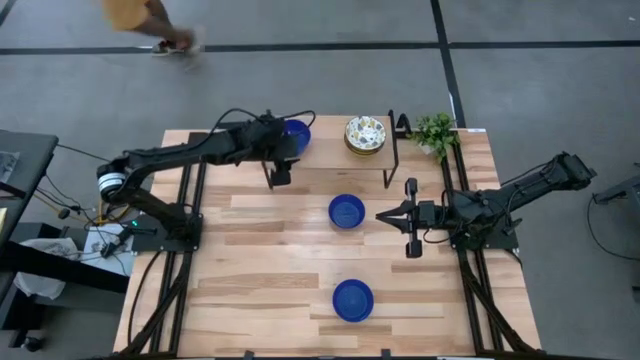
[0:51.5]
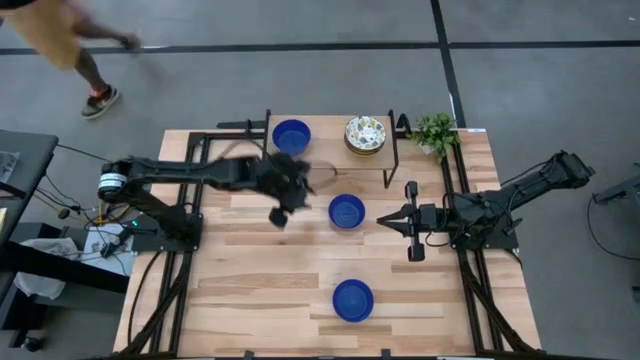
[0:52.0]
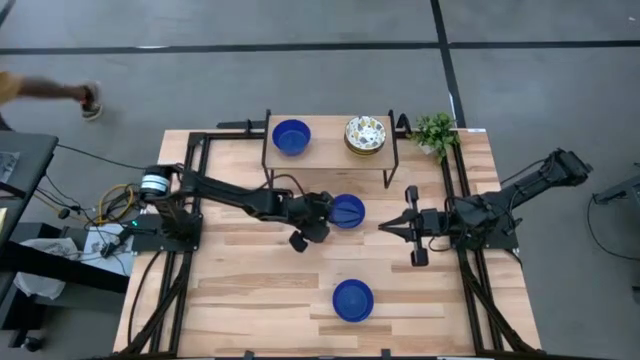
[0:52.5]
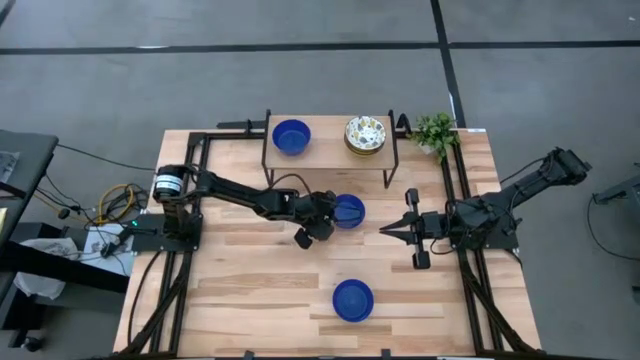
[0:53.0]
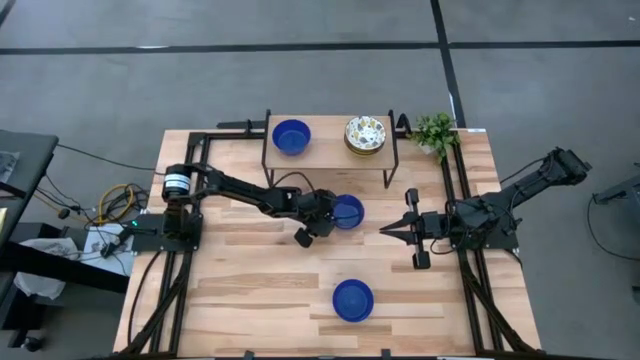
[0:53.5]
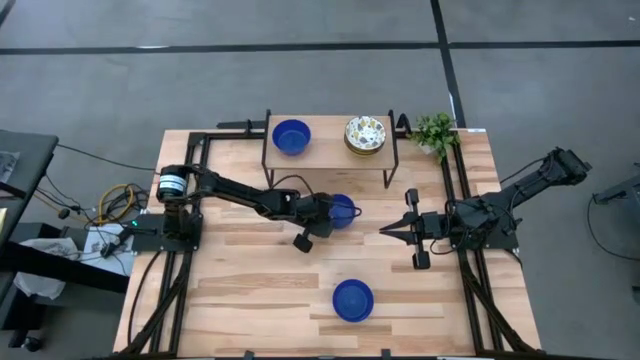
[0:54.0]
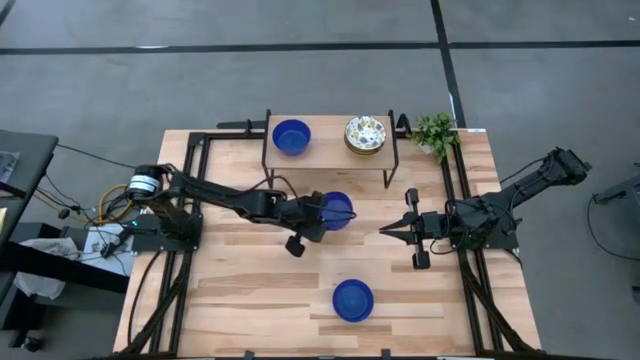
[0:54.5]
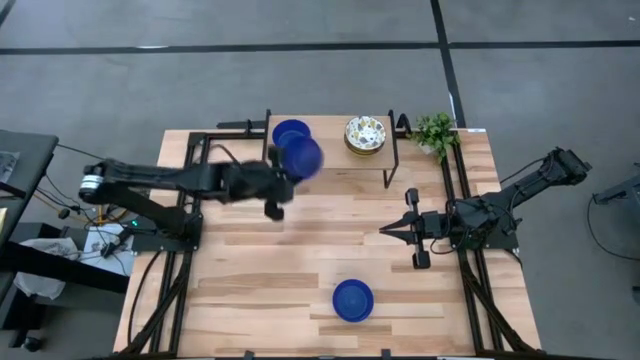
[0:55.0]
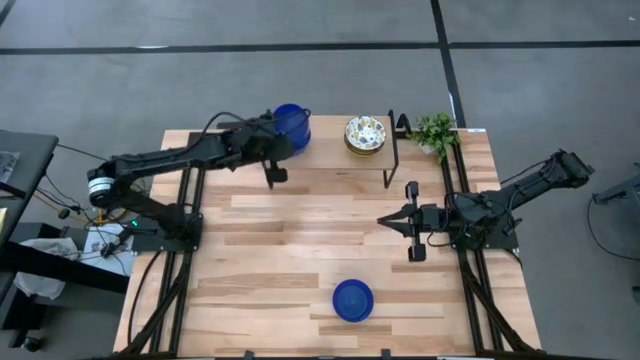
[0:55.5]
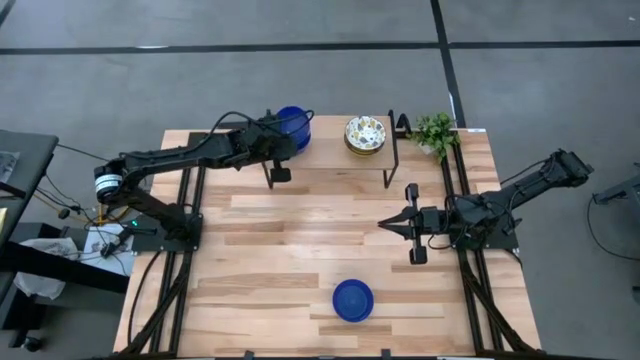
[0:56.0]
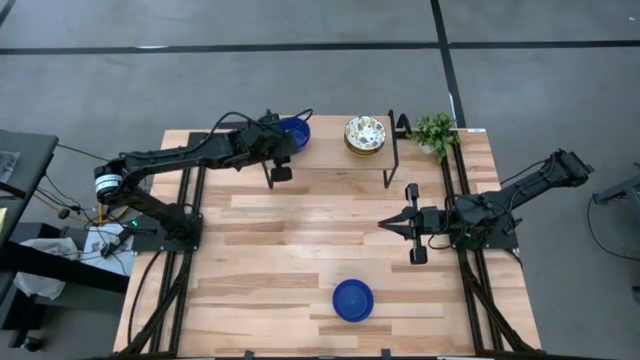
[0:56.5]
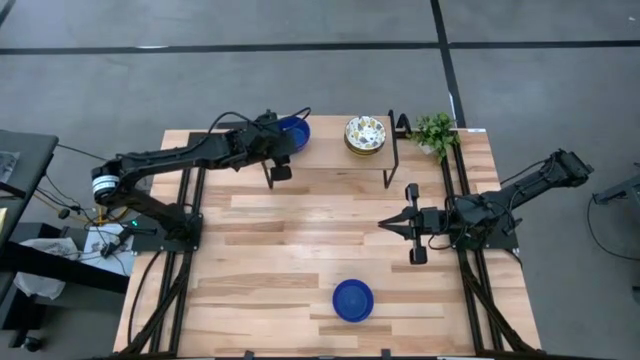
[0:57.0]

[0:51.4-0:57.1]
Task: Pick & Place Mini bowls
Stack the top blue bowl on top of the blue bowl on the shelf

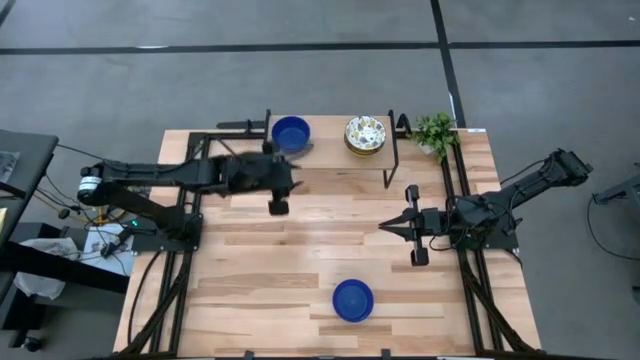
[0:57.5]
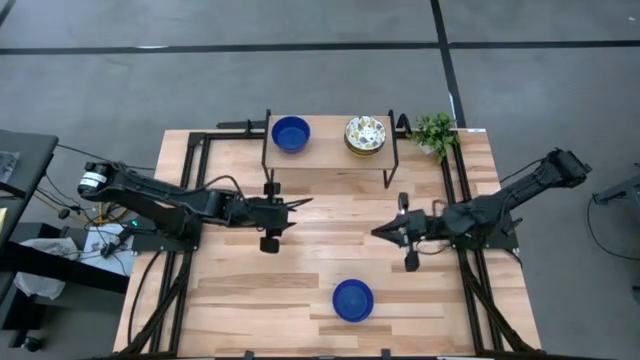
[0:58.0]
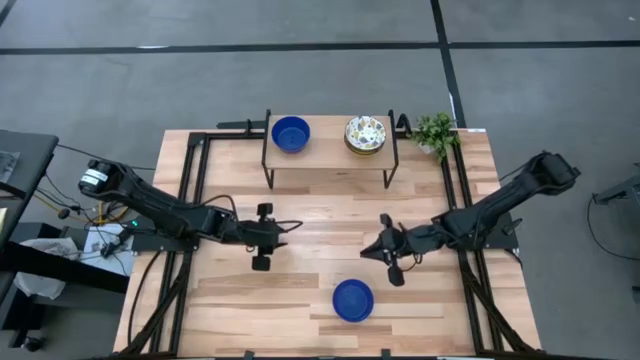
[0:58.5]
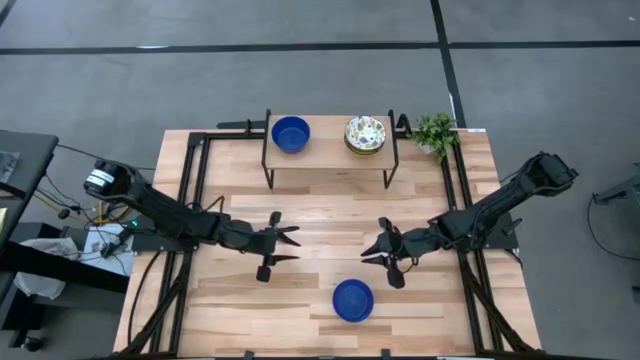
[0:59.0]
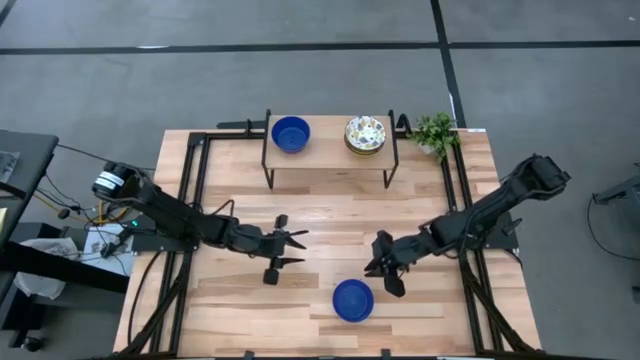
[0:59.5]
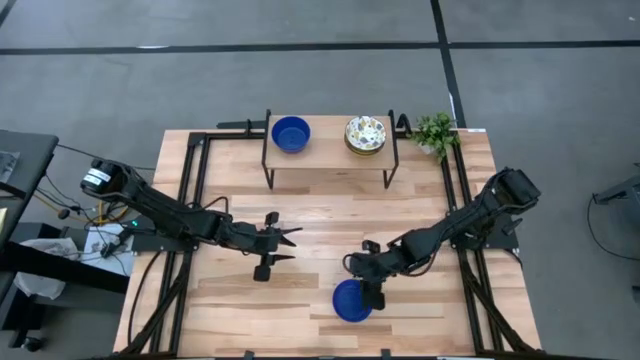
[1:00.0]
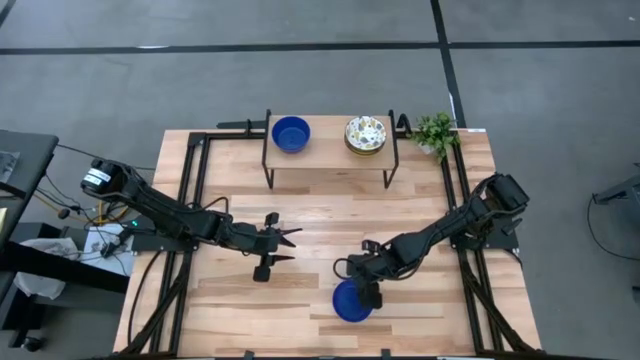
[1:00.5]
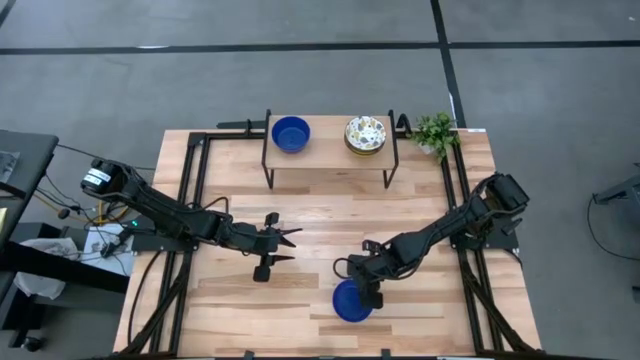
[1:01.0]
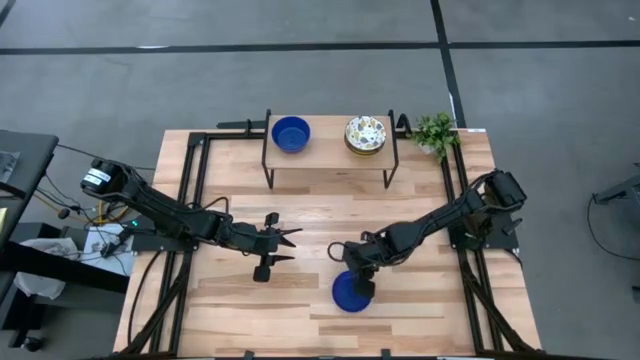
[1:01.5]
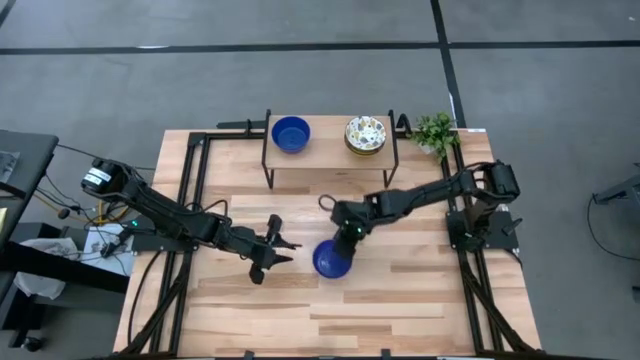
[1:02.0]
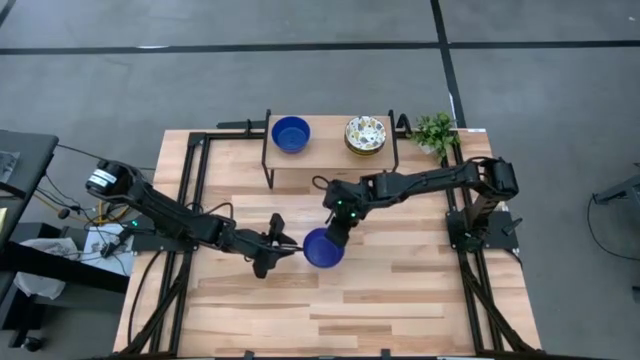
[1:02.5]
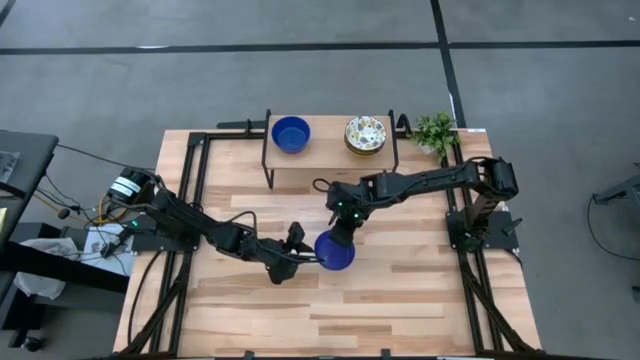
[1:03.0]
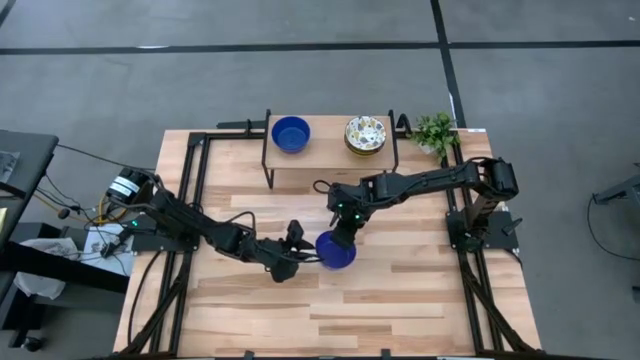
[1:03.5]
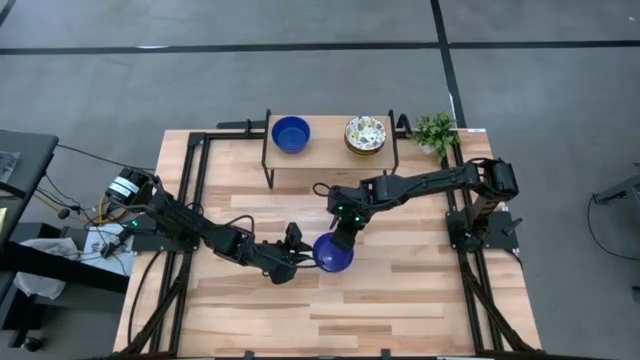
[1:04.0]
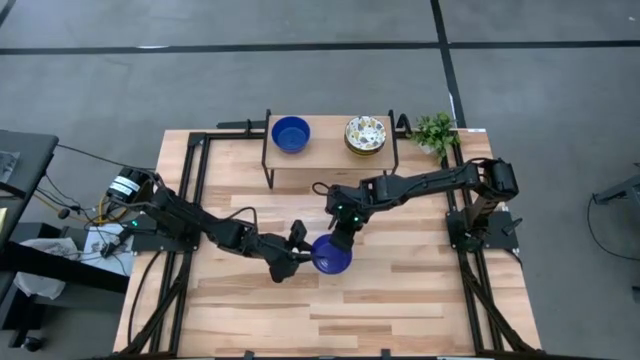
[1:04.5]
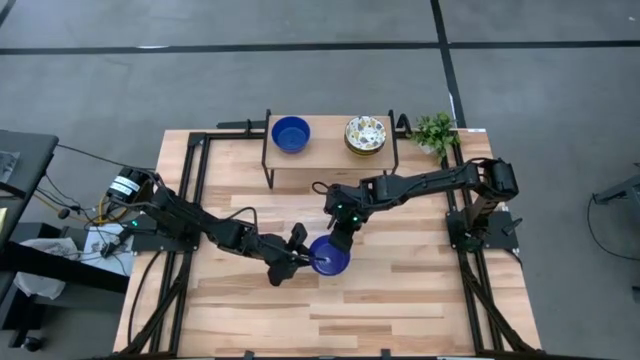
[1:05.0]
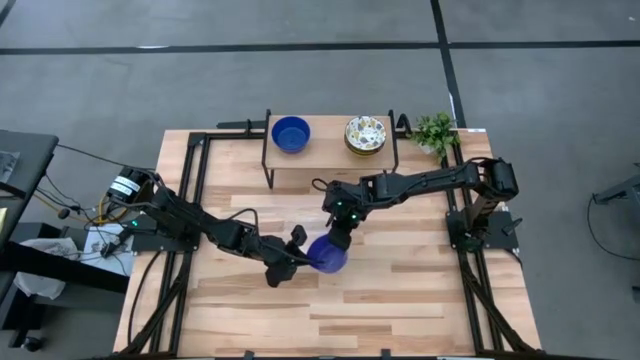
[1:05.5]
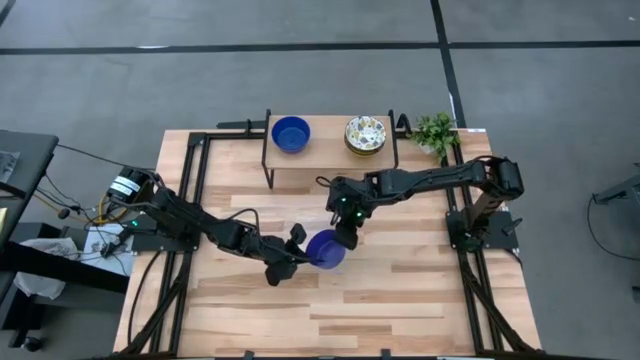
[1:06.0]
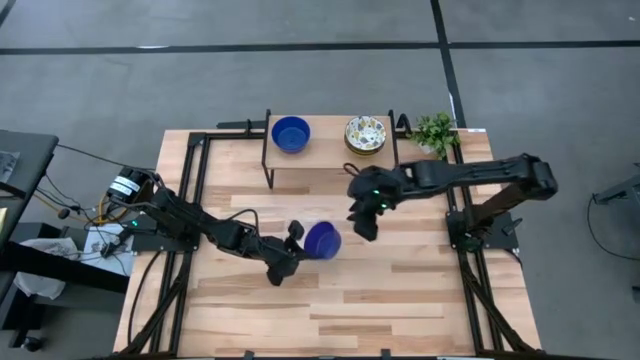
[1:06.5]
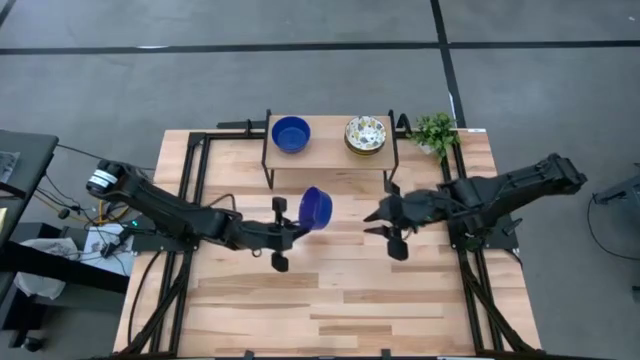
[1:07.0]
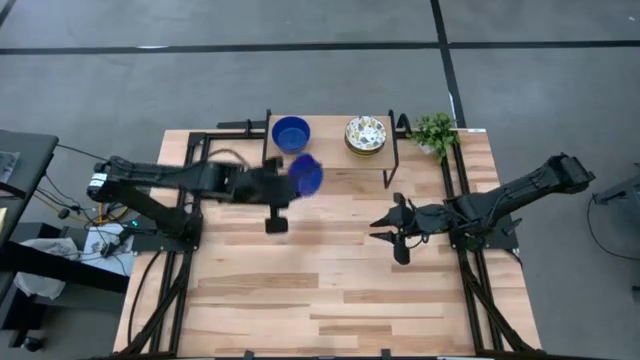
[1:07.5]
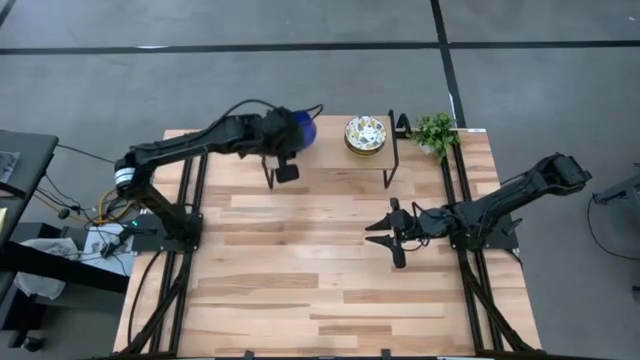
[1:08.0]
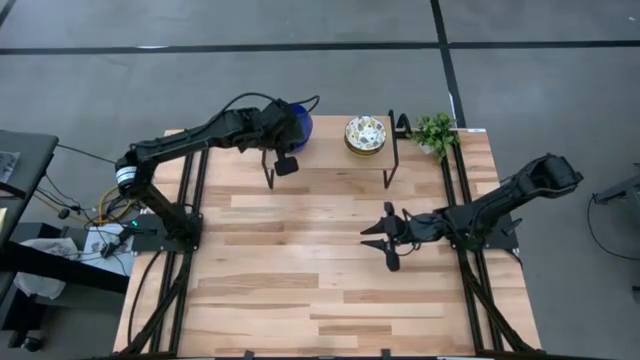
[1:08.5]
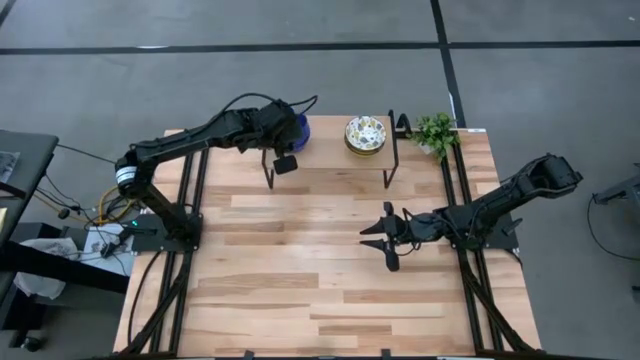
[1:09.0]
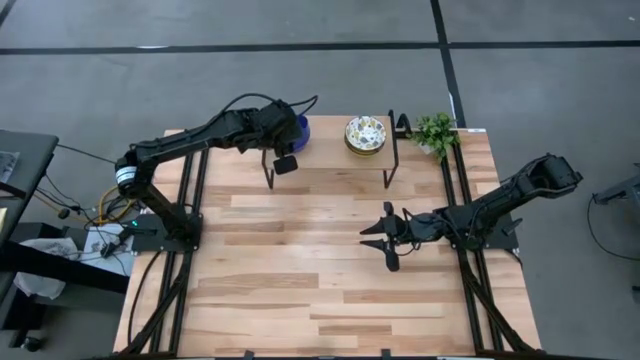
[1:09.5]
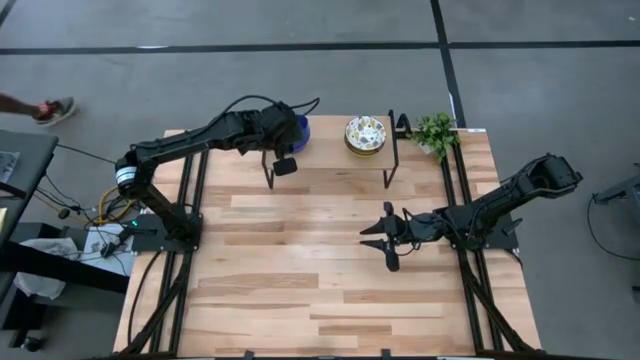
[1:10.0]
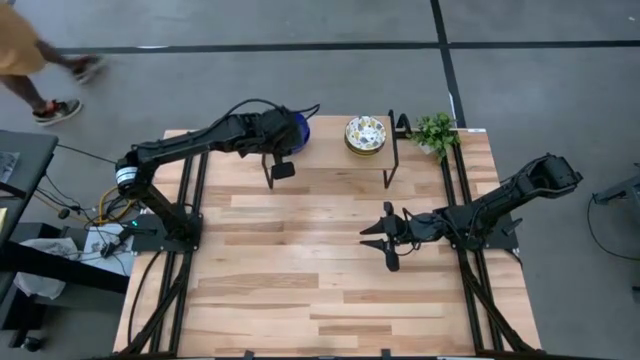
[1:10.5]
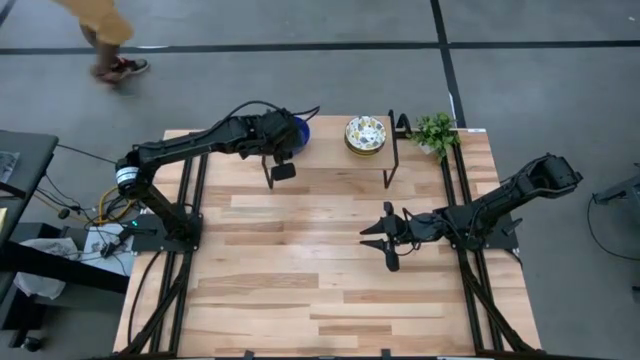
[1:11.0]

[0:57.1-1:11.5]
Stack the blue bowl on top of the blue bowl on the shelf
